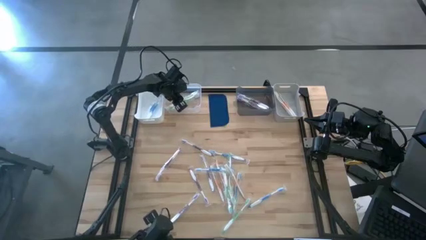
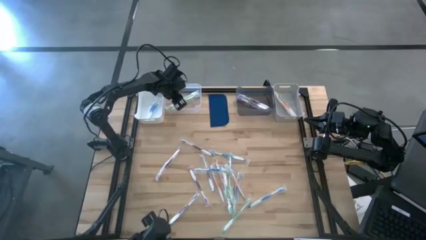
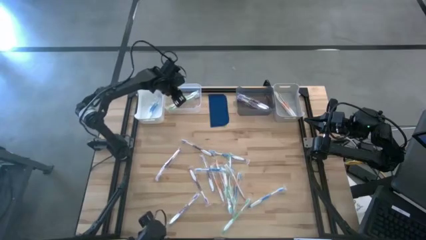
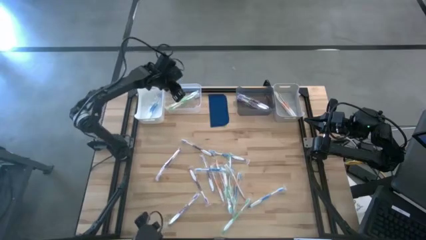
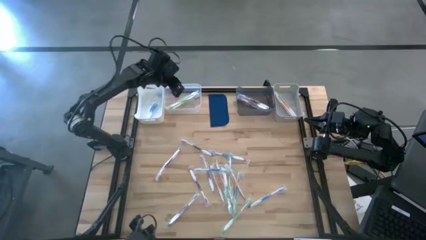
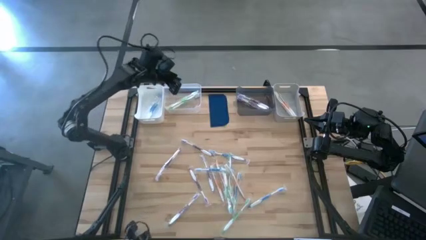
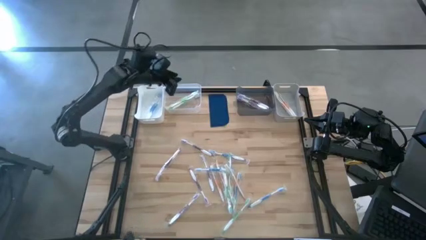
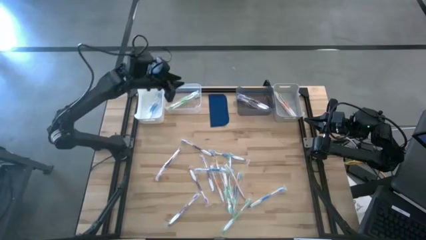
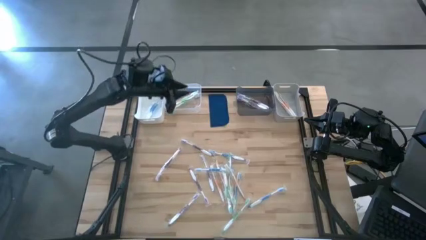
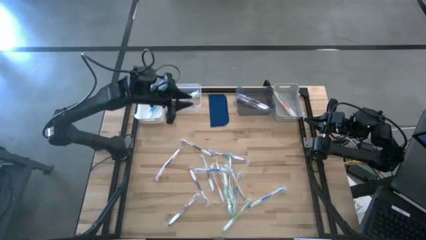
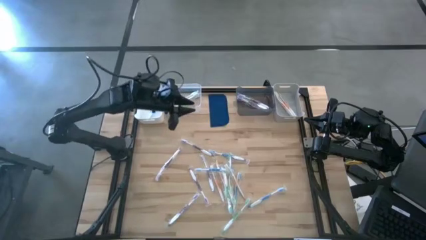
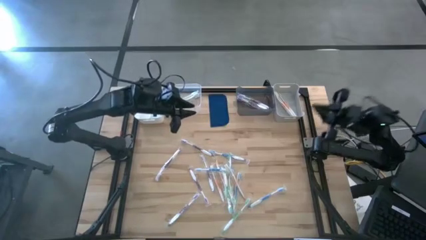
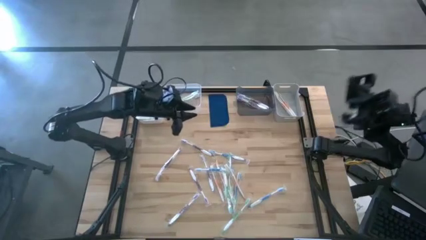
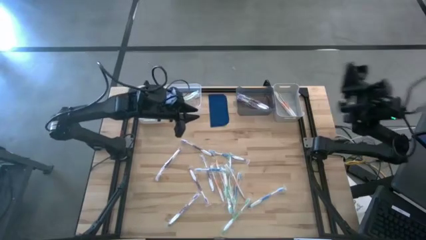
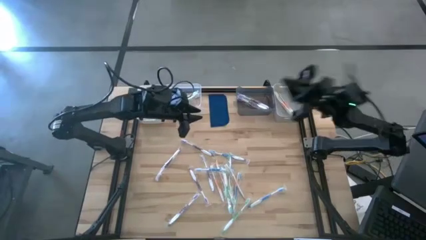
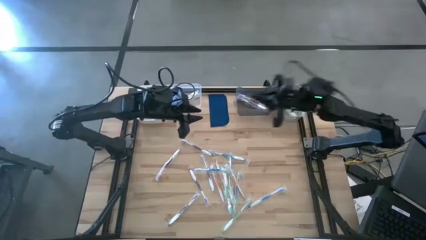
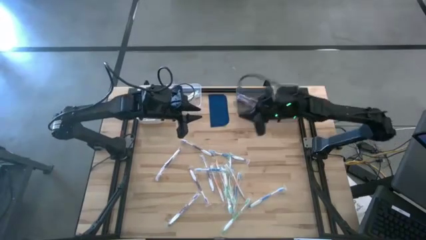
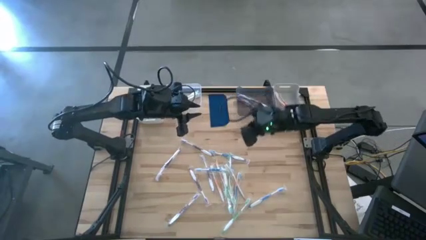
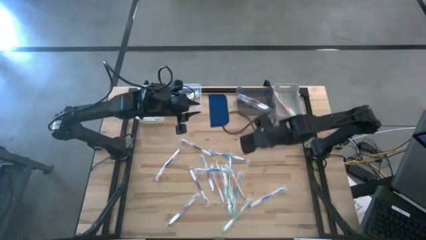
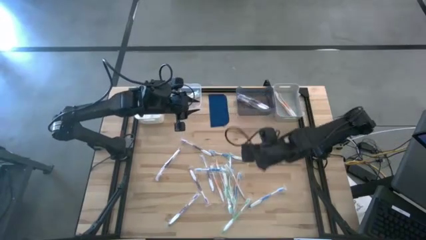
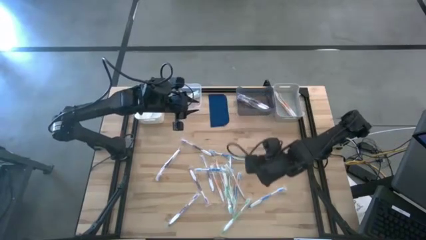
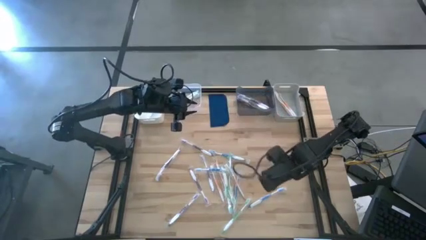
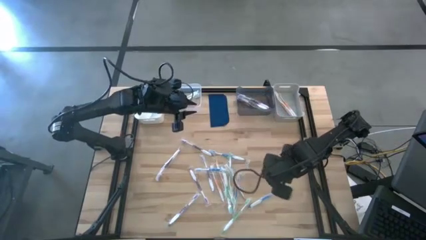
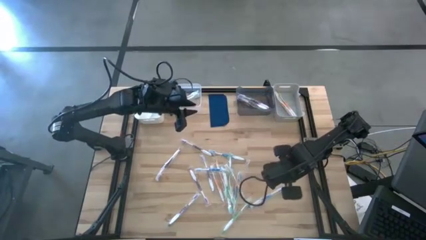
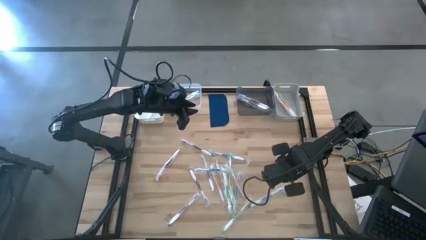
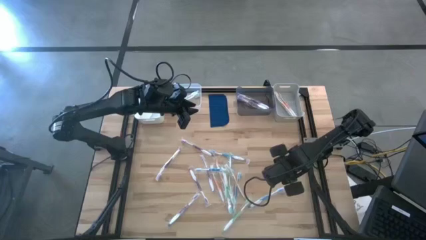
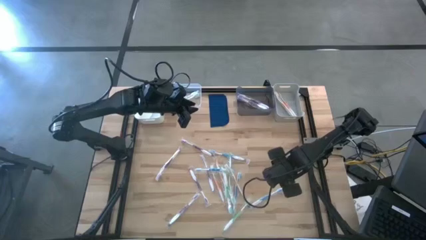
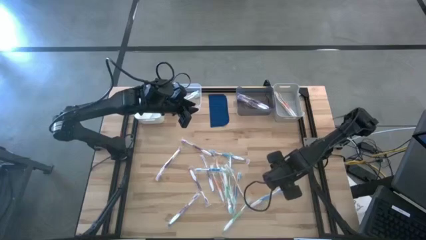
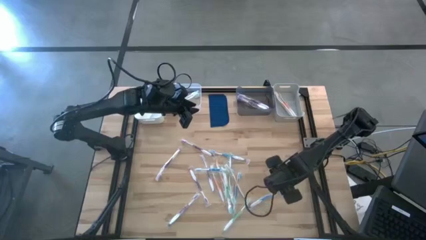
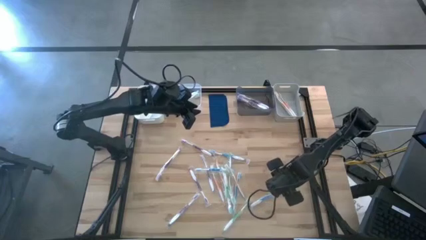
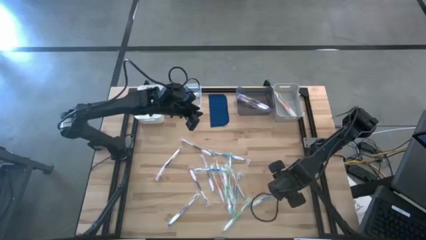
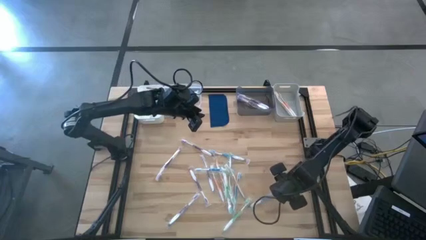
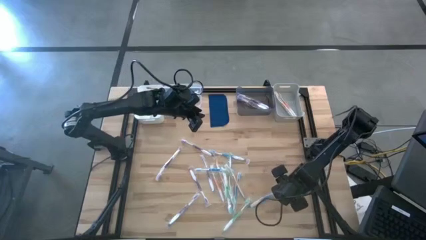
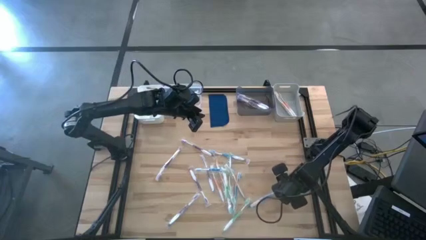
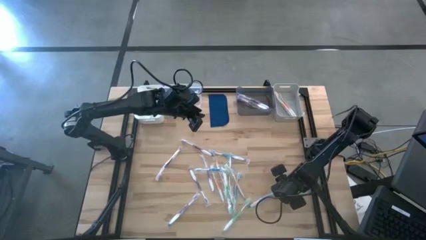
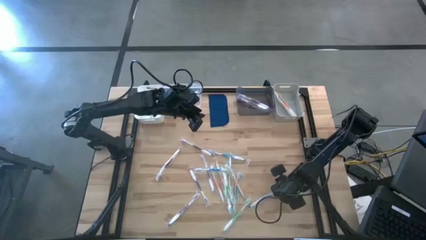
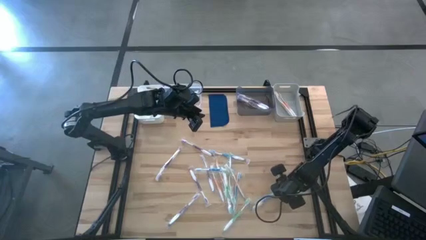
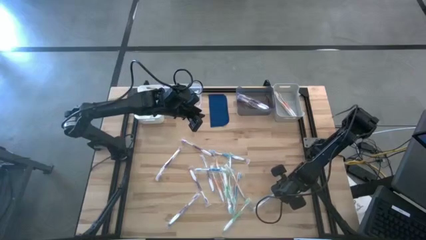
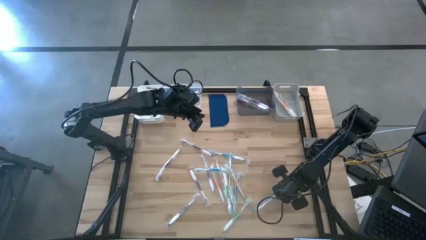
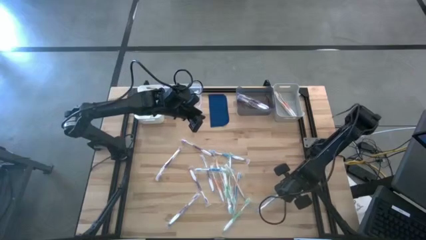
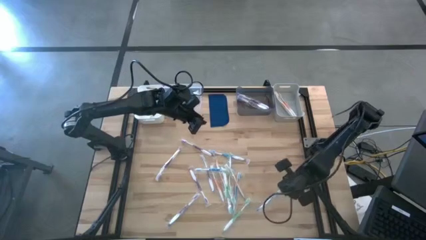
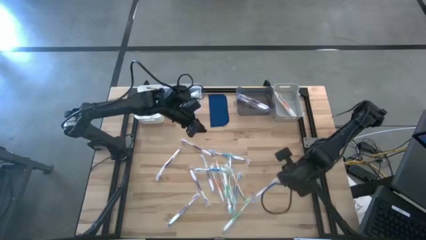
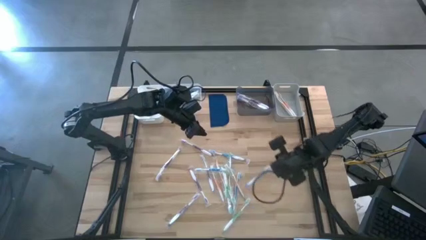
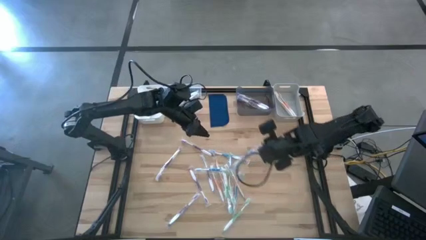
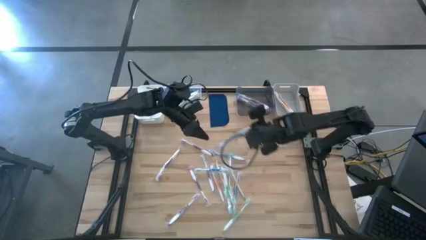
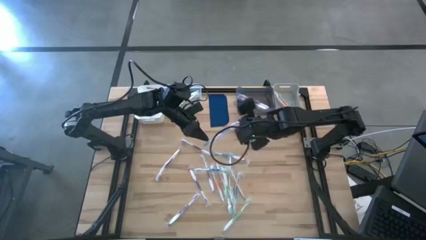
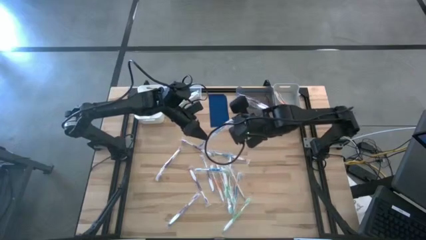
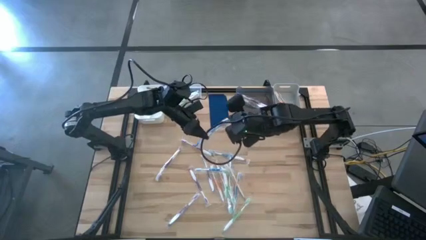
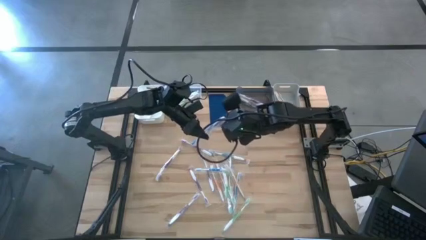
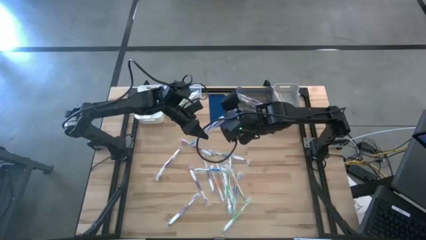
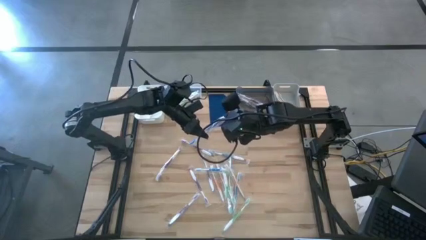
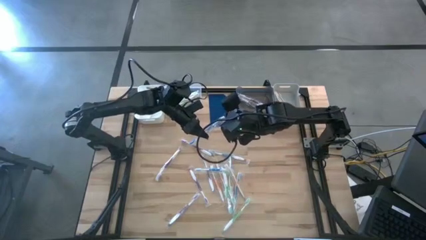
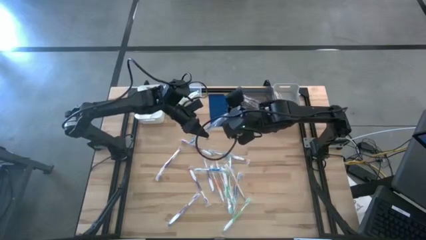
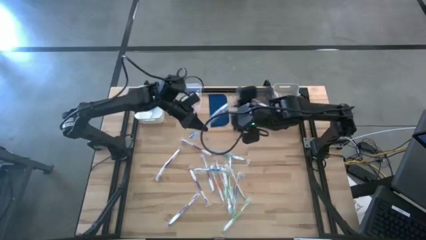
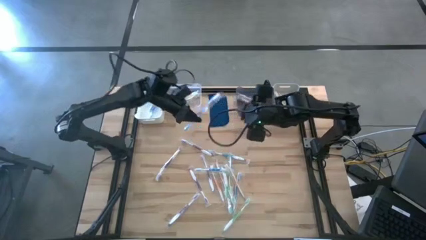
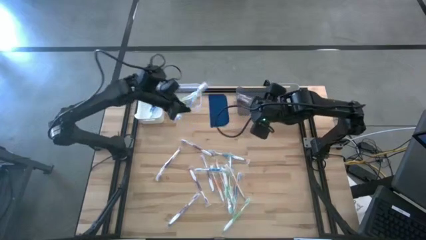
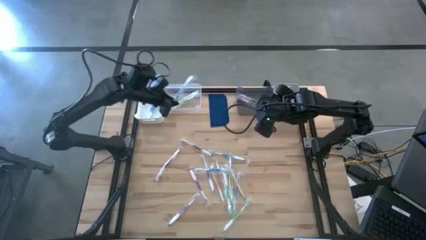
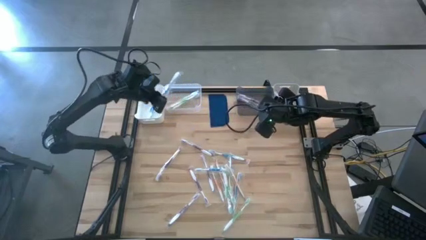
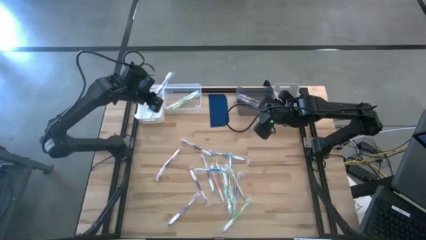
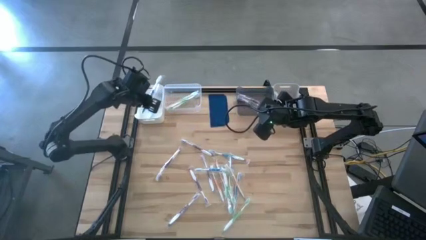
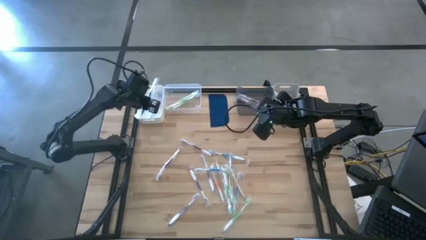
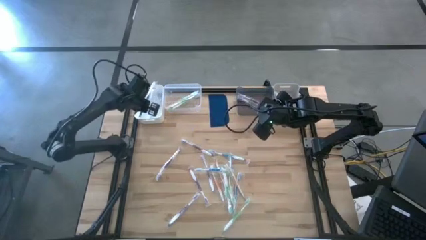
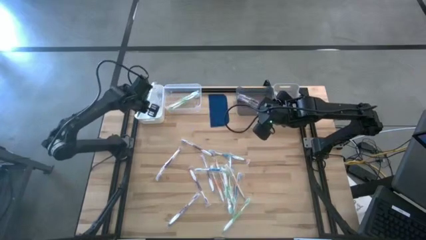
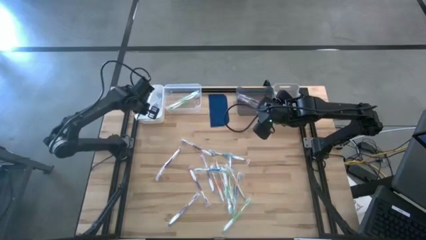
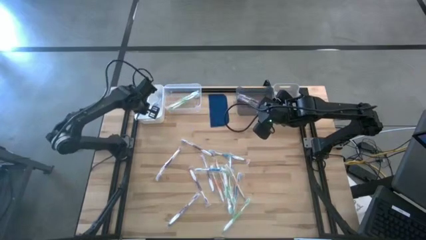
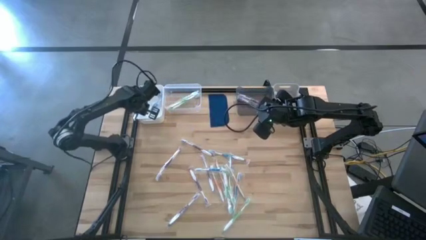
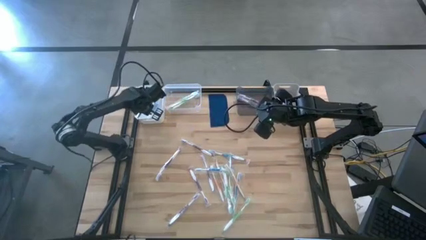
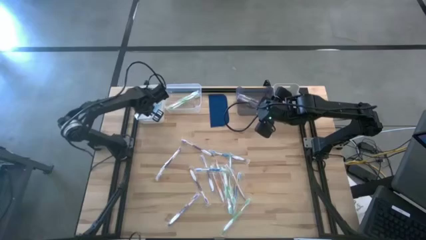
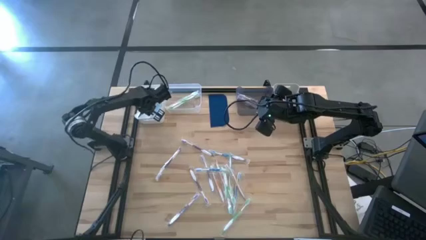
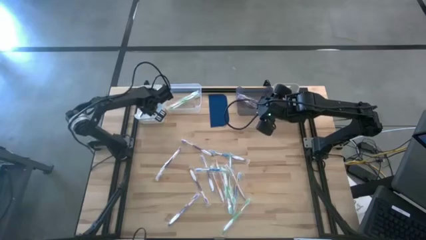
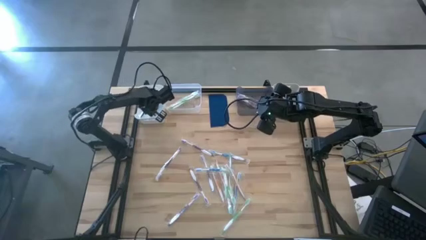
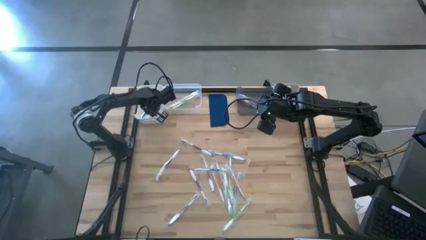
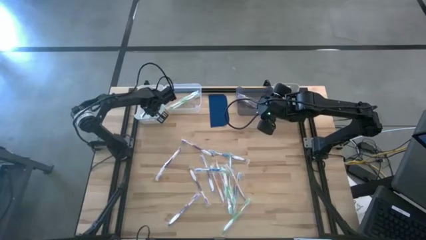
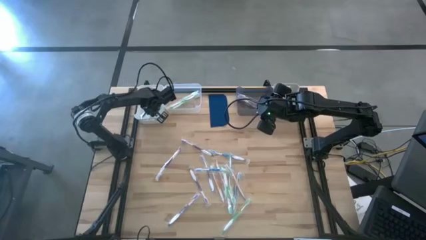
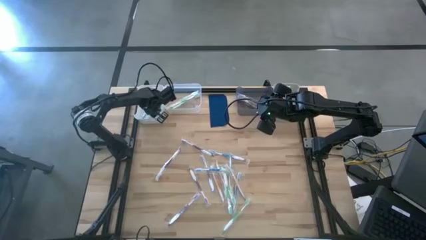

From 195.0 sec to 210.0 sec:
Task: Pick & Place Toothbrushes
Put the blue toothbrush into the white bin

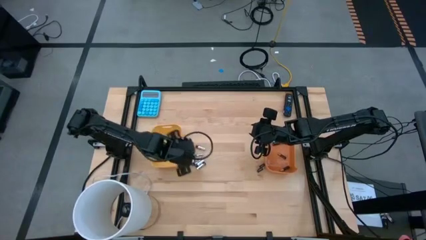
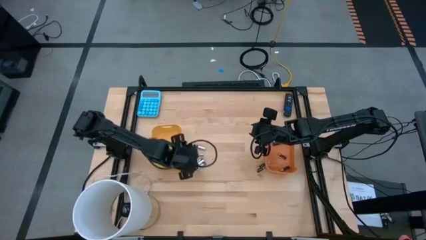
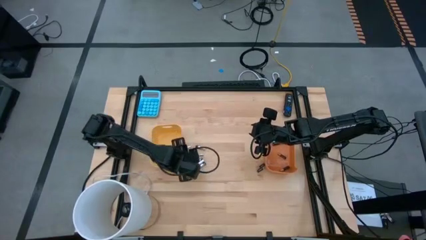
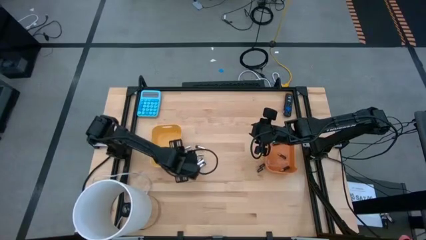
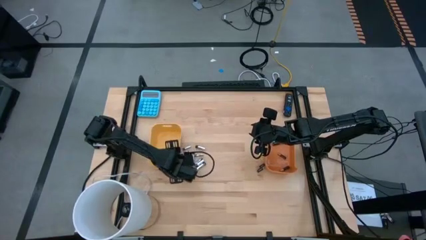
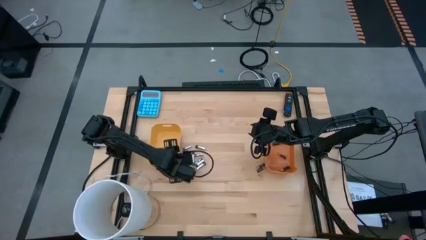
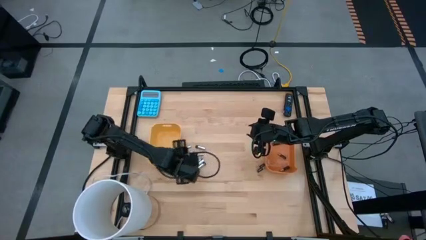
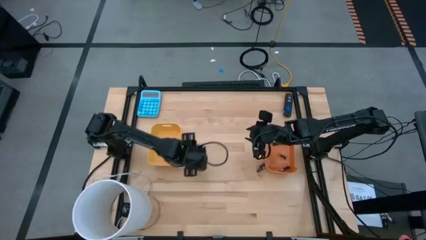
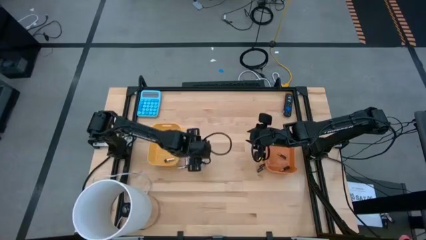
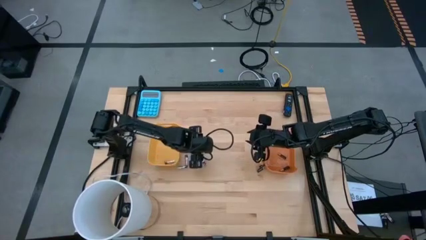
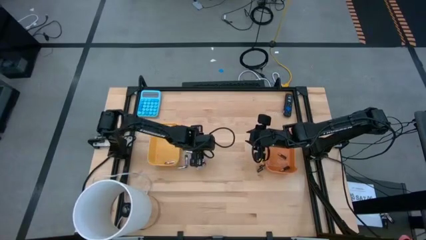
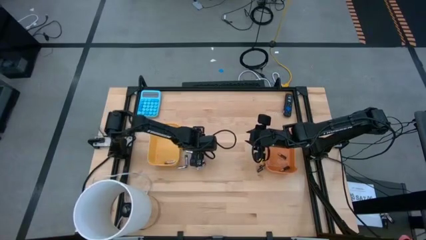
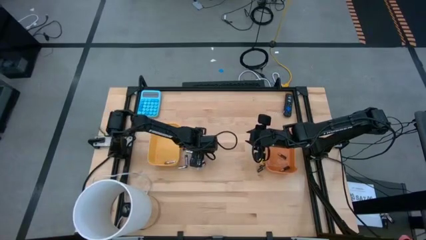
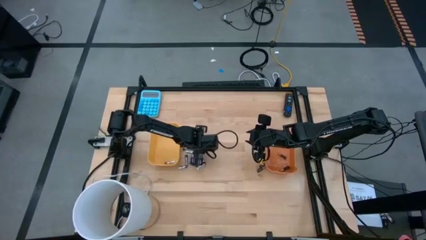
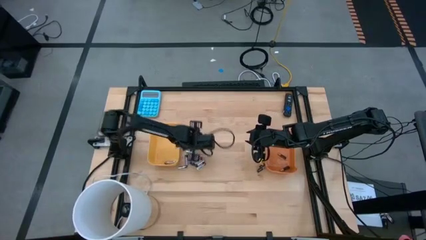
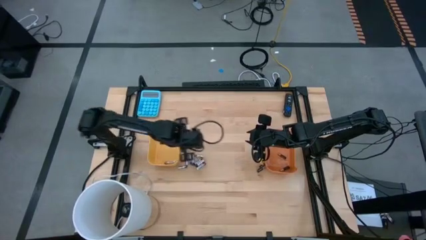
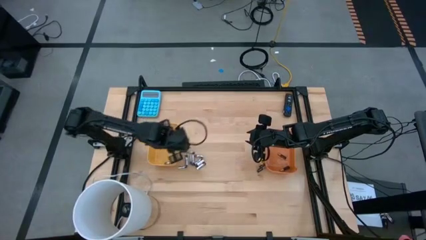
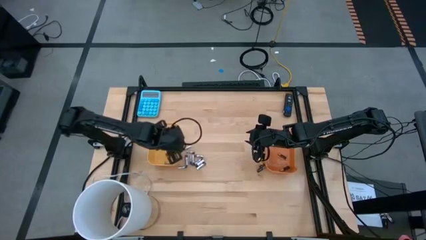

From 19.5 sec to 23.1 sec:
Task: Sort batteries
Put the silver battery into the yellow bin
